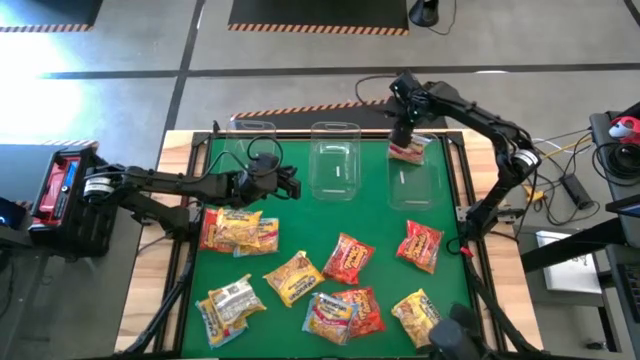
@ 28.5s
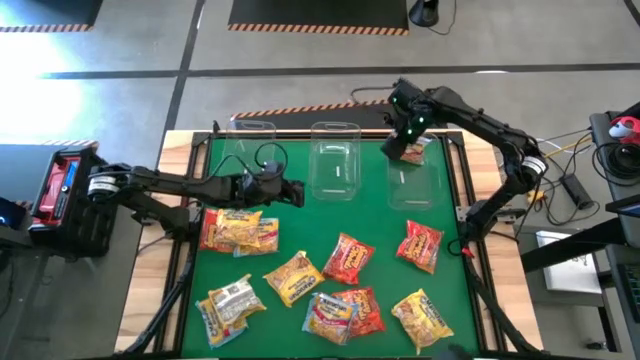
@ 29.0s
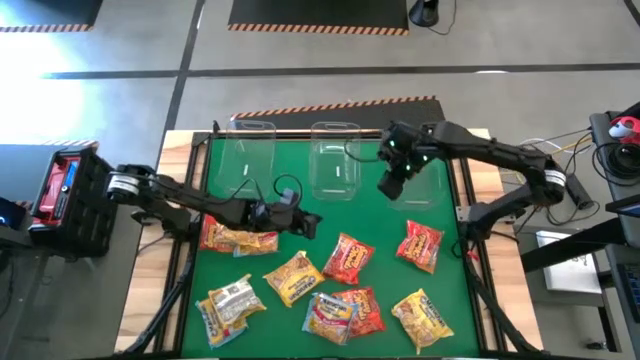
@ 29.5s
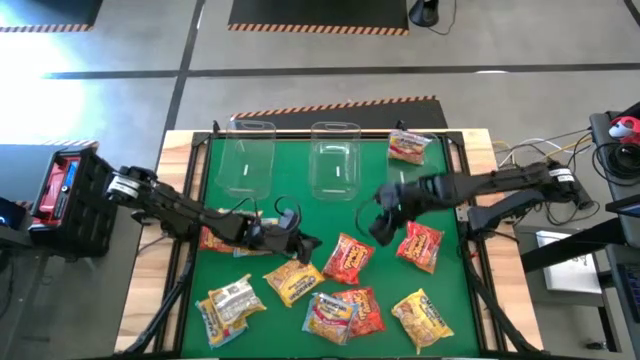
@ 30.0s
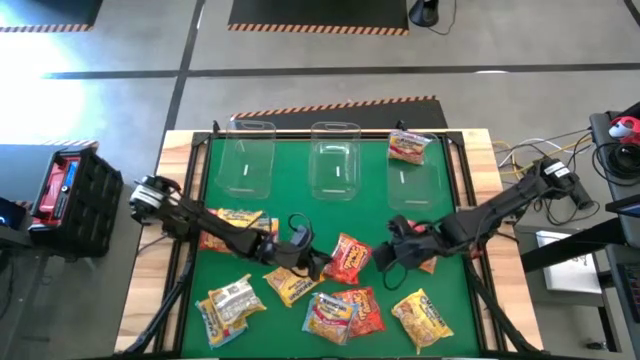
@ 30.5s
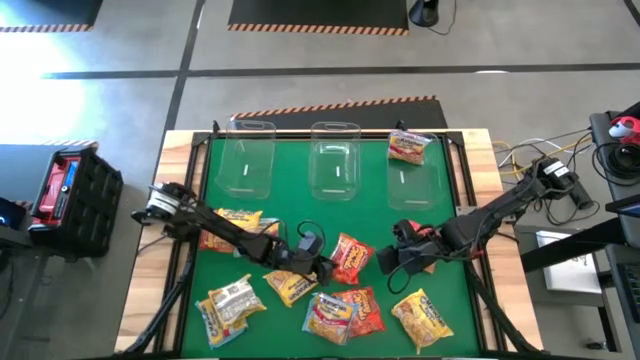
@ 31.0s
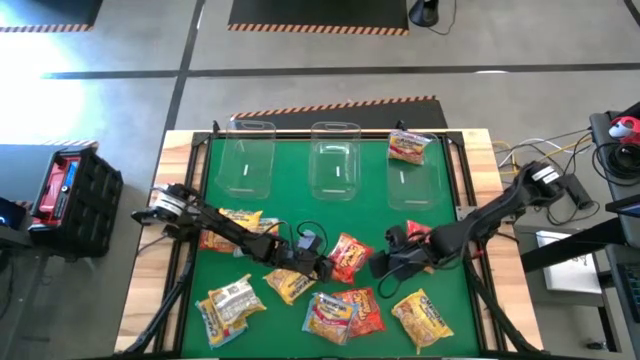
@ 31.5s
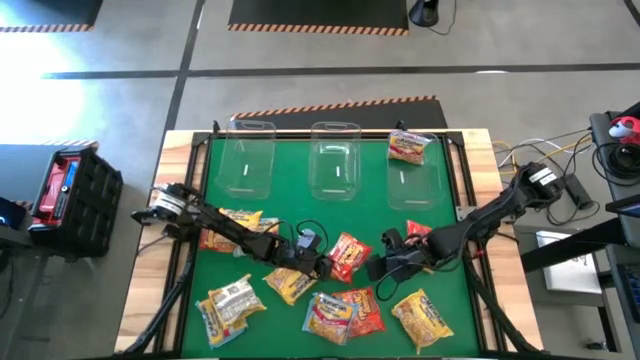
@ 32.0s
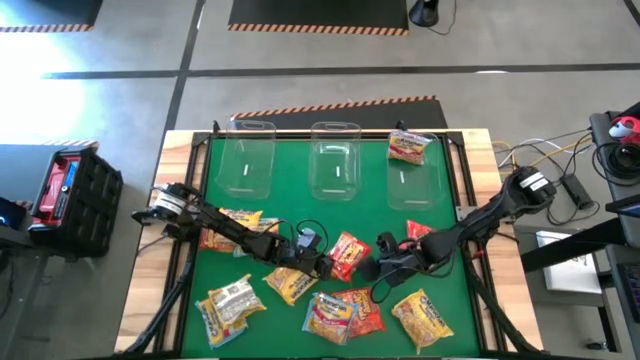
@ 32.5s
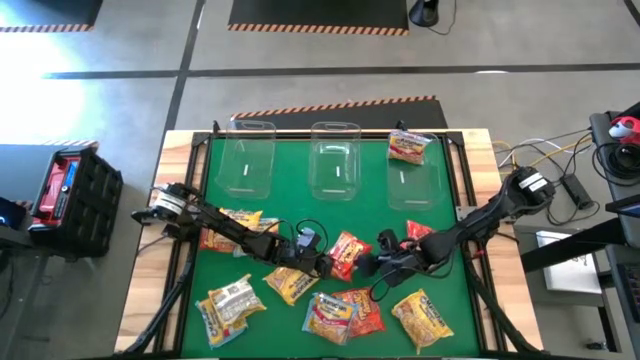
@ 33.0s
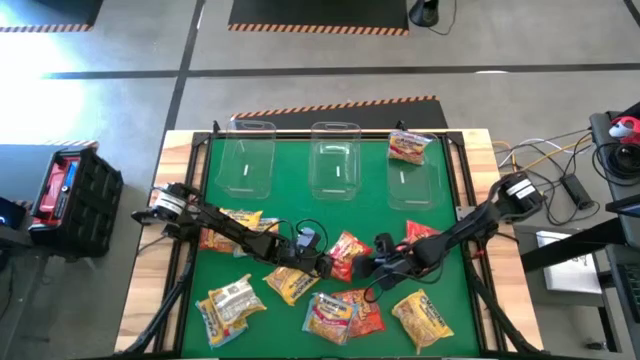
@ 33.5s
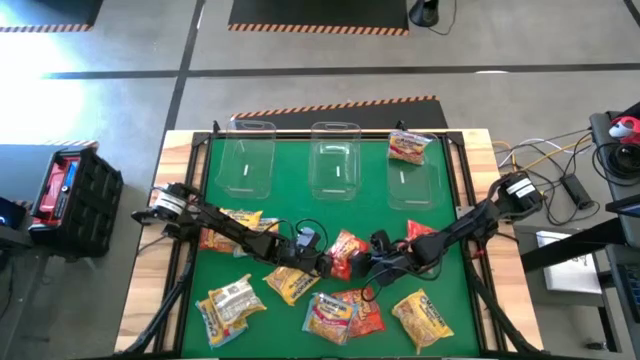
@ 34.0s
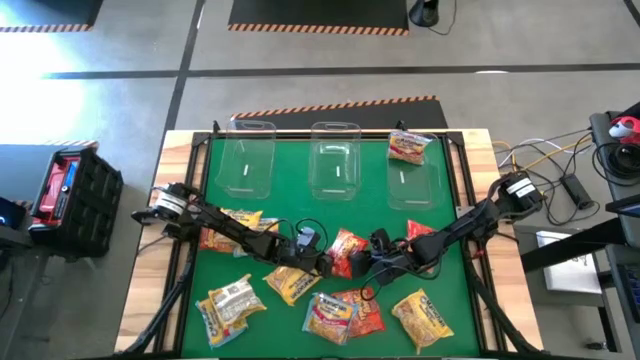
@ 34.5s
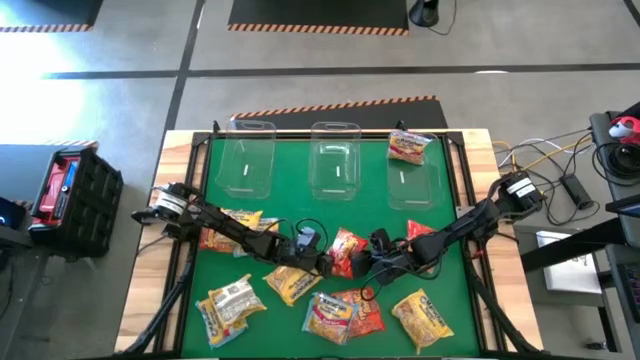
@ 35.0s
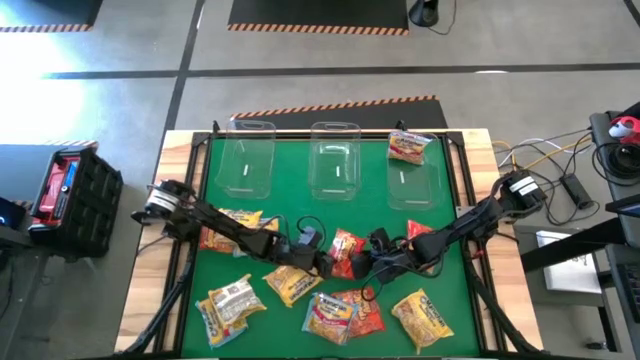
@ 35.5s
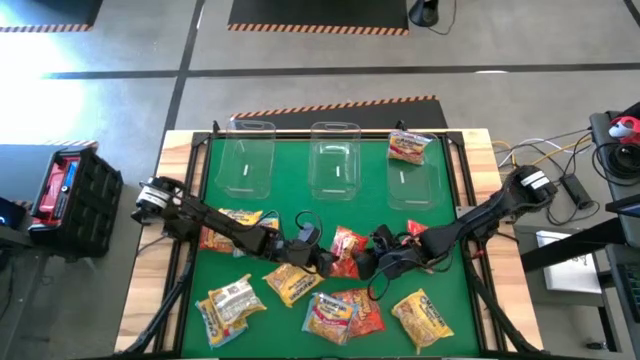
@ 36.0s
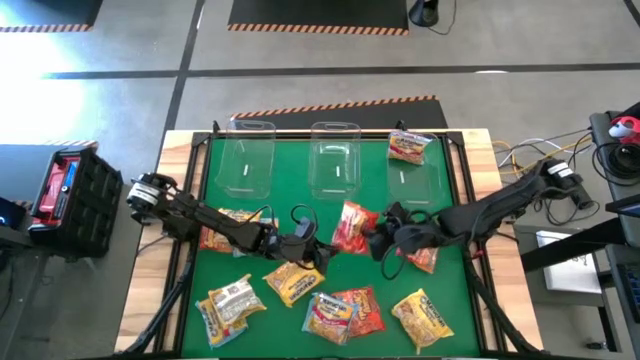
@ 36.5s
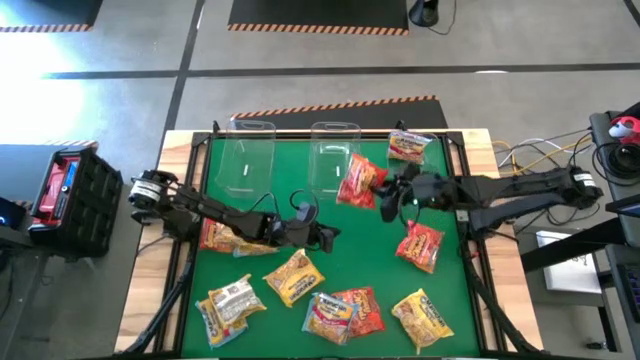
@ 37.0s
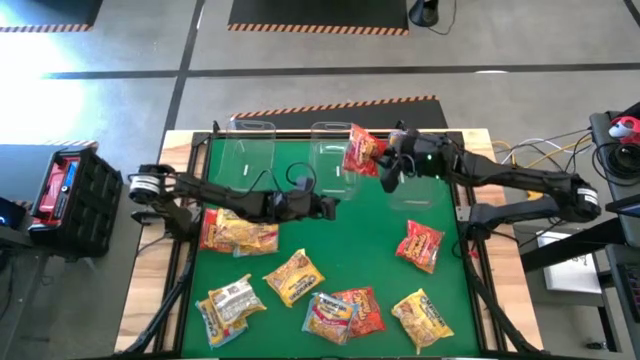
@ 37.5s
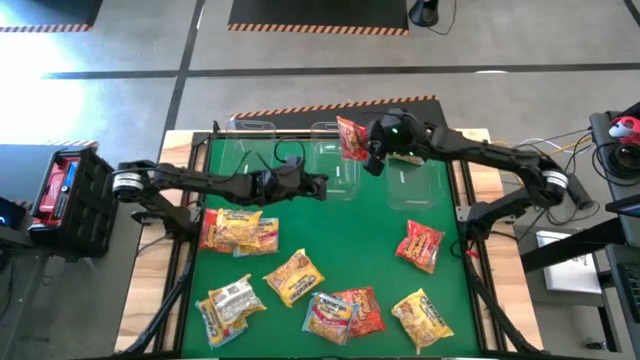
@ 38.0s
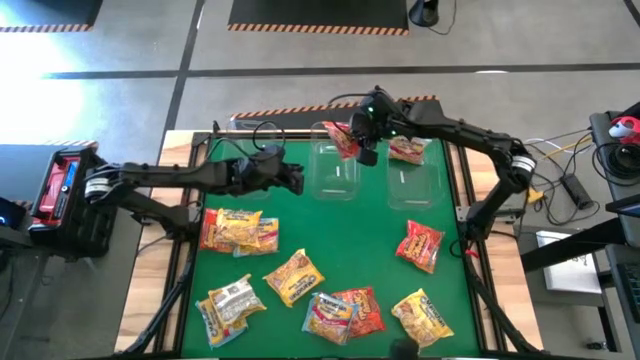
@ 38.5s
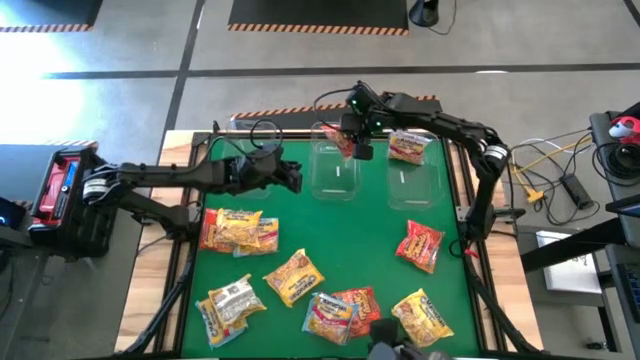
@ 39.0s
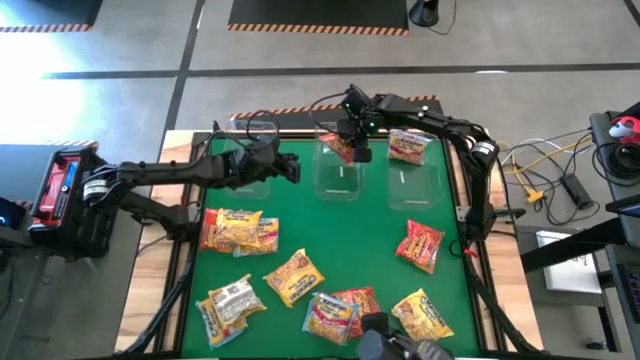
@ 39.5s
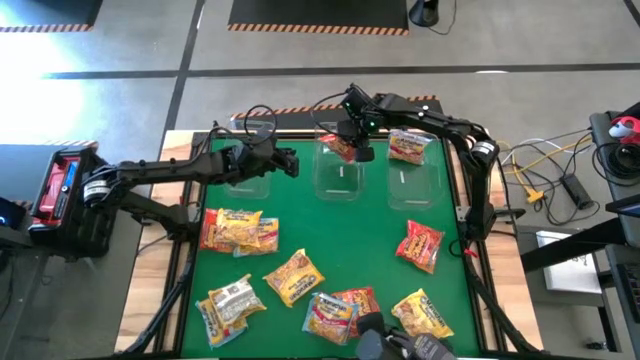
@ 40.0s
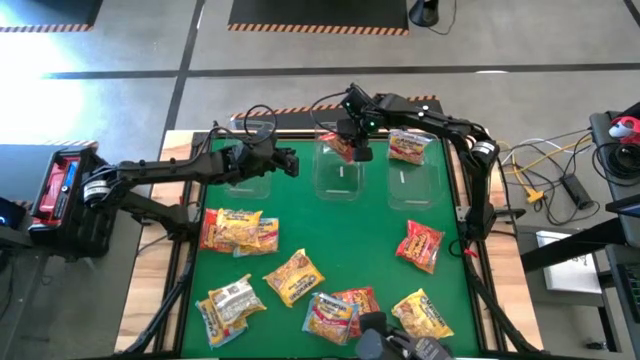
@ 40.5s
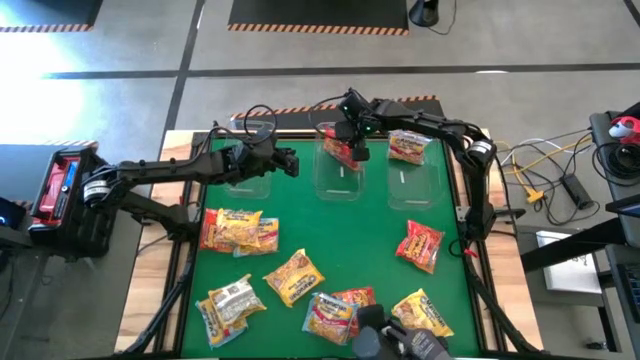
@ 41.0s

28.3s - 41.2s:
Task: Sort Maruchan noodles
Put the orange noodle pack into the middle transparent bin

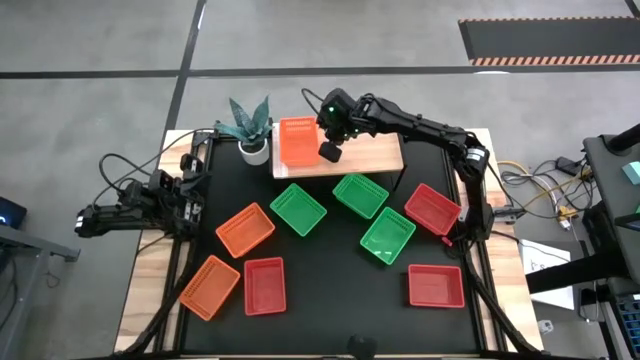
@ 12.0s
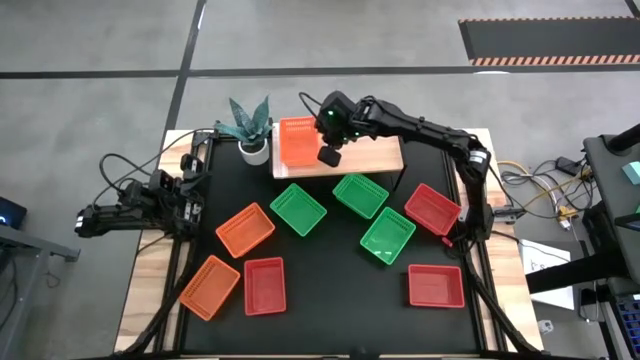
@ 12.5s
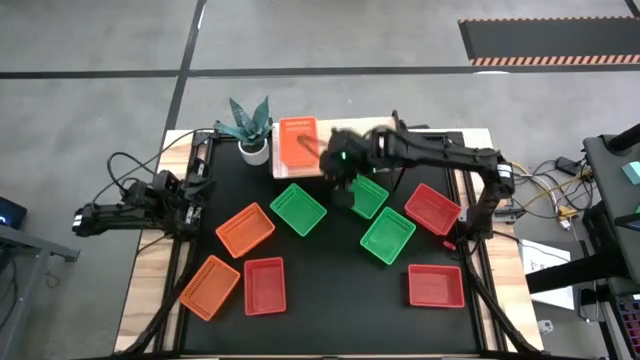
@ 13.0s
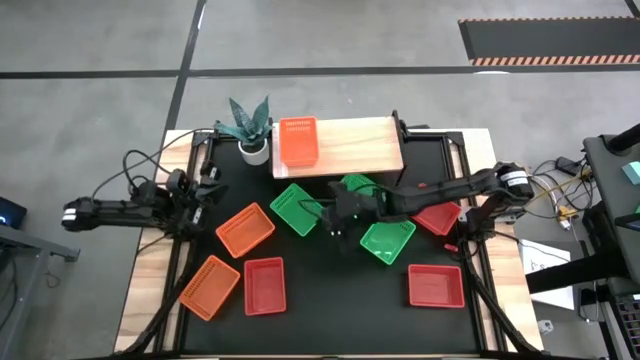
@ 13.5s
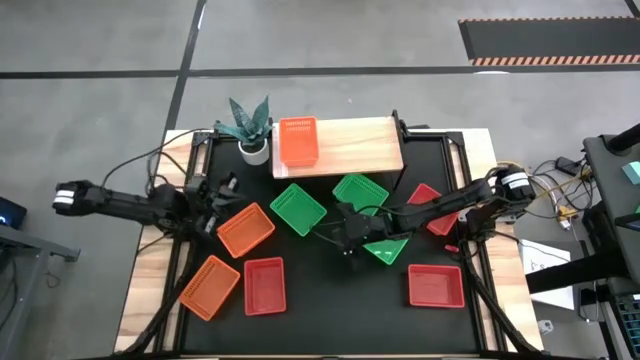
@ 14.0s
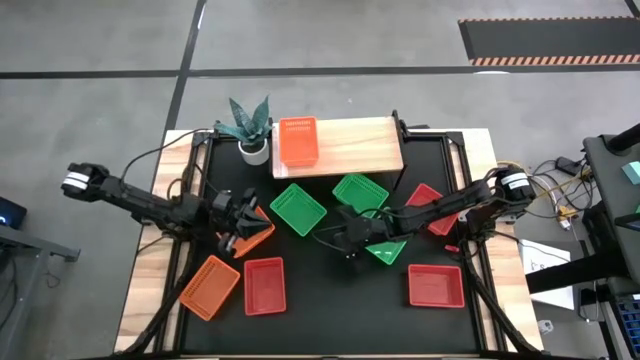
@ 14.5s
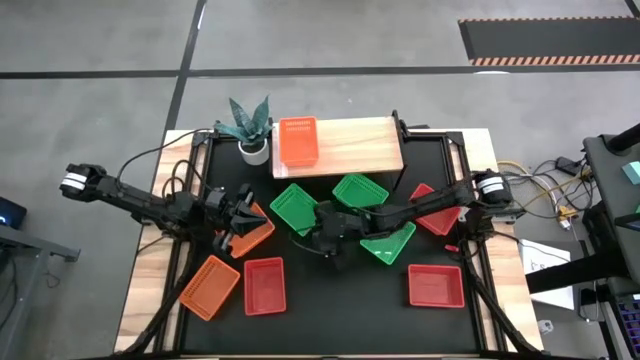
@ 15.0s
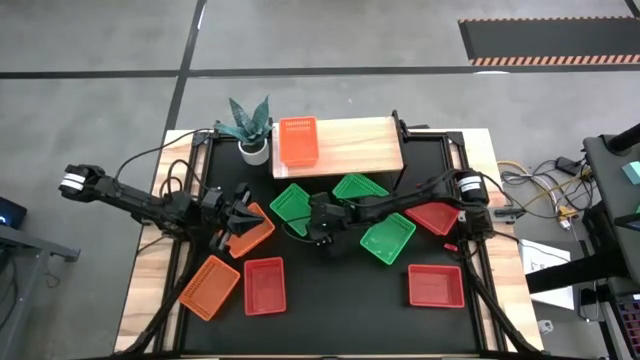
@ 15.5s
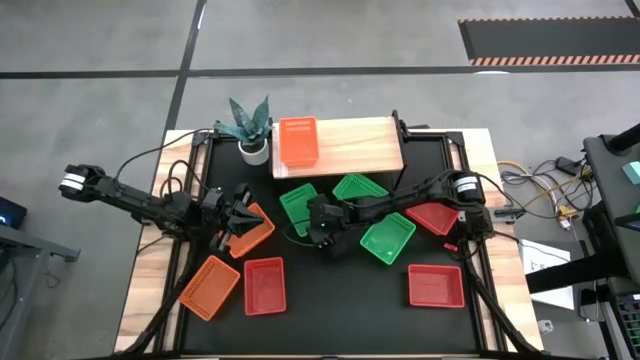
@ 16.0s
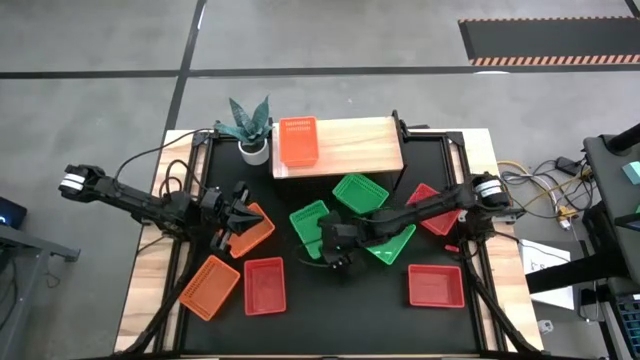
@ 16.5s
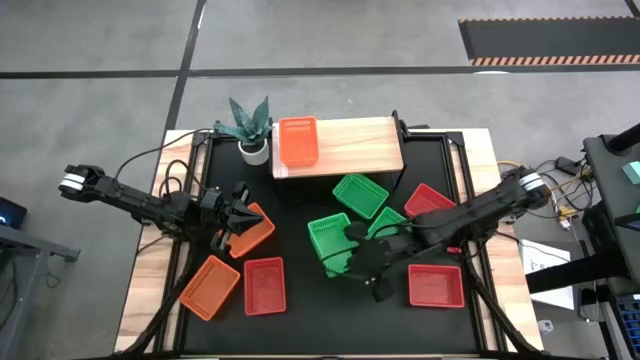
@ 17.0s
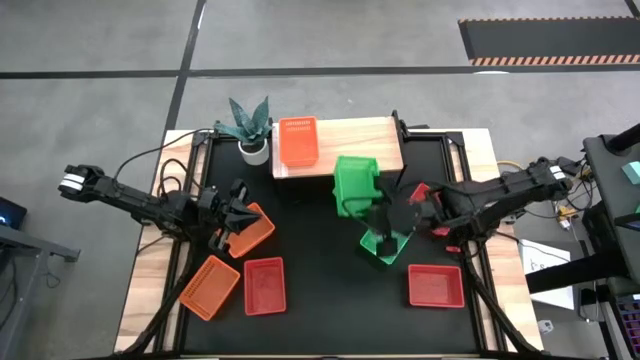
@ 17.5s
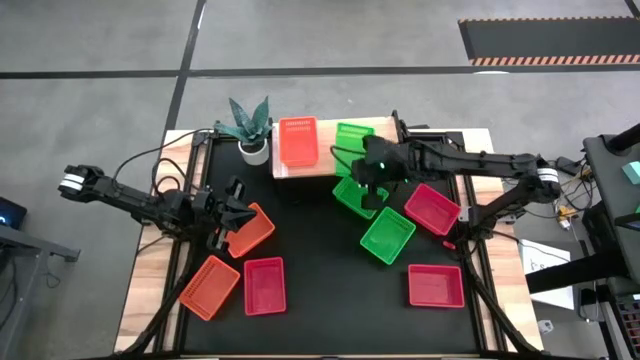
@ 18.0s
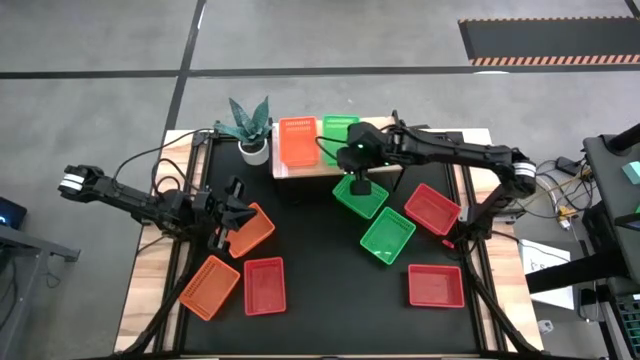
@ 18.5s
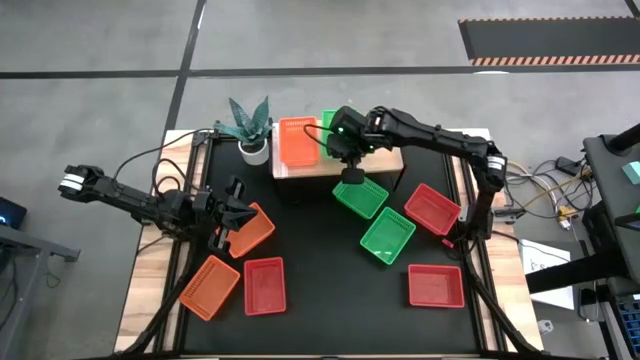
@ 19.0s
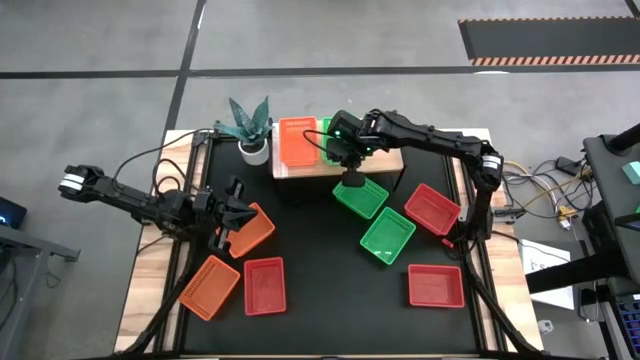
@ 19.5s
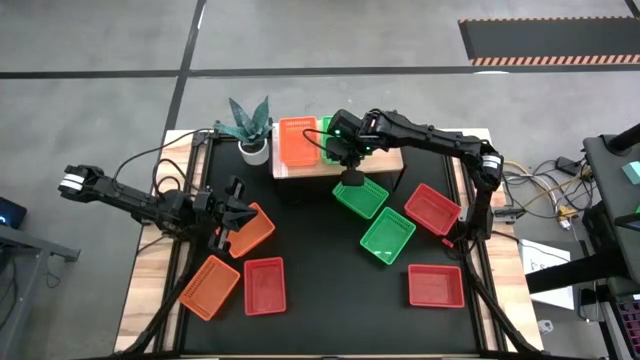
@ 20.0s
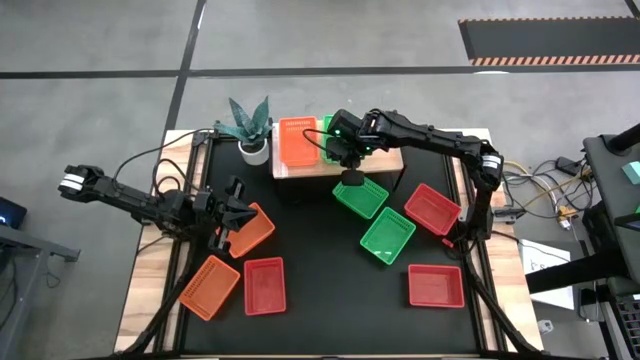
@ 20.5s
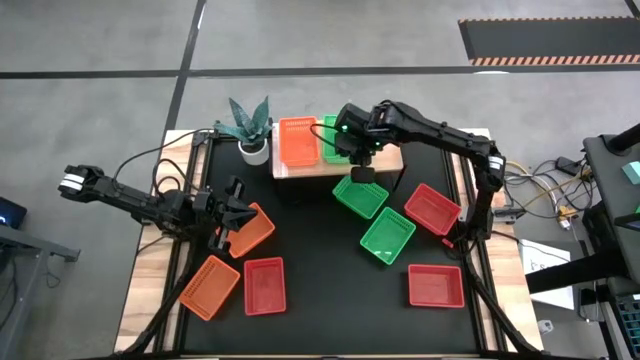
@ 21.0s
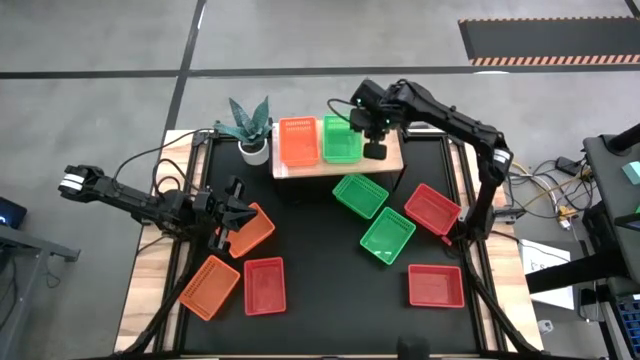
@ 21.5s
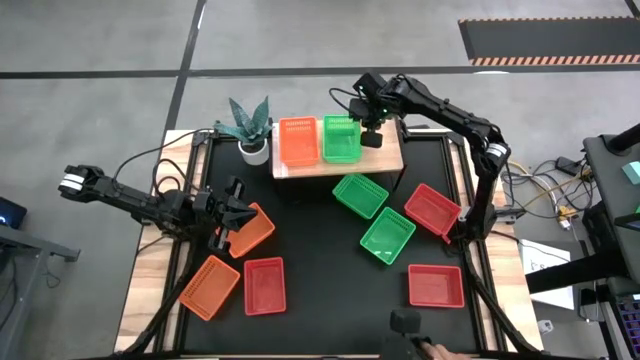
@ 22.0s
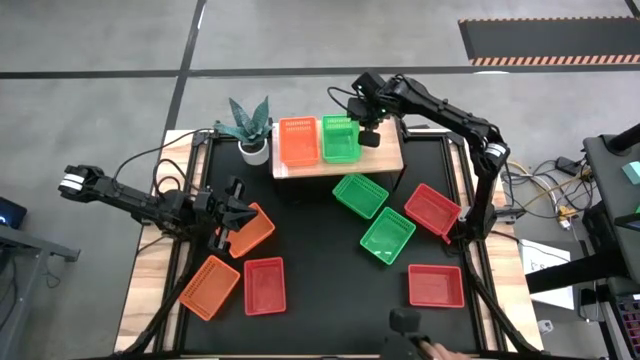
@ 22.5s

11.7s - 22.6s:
Task: Stack baskets on shelf by color
Put the top left green bin on the shelf
